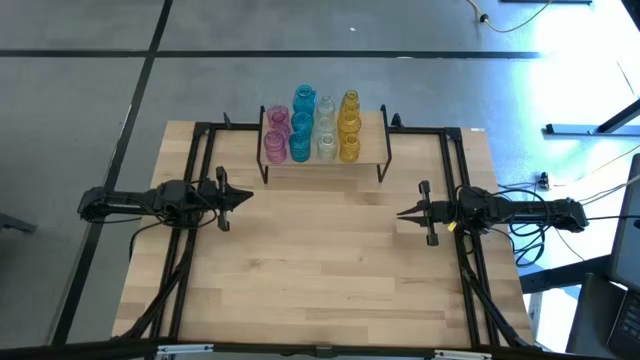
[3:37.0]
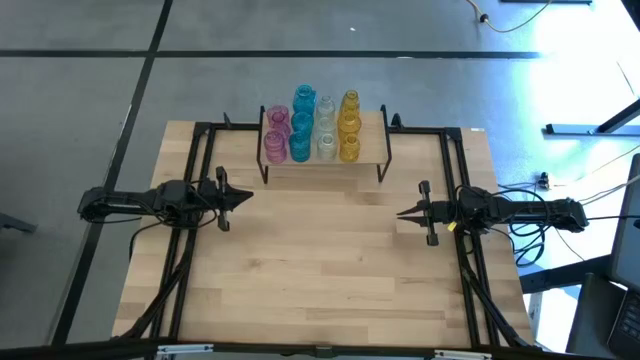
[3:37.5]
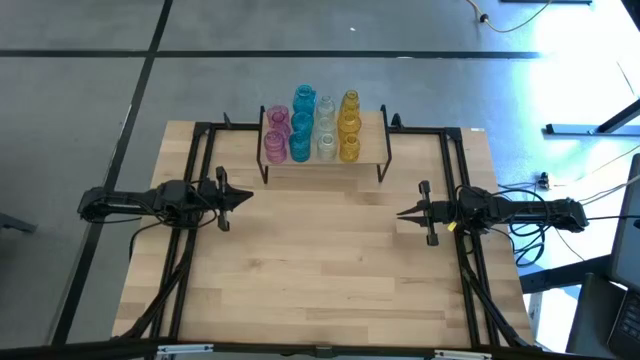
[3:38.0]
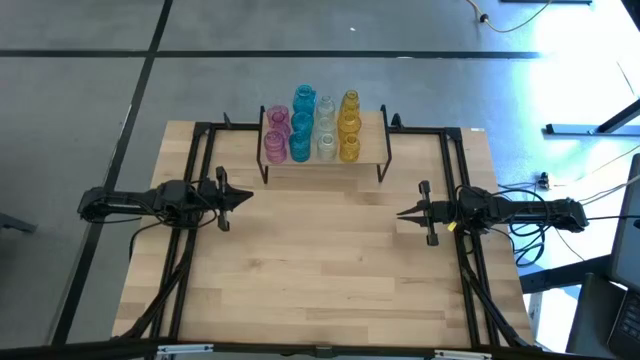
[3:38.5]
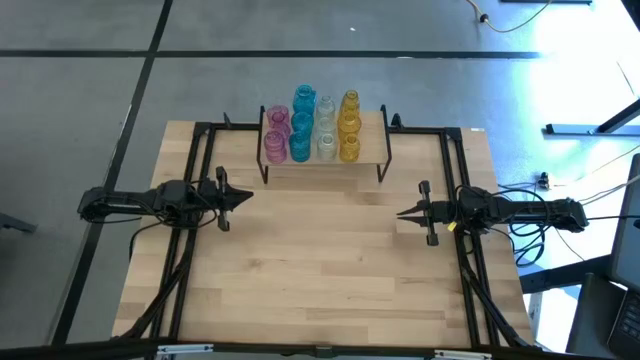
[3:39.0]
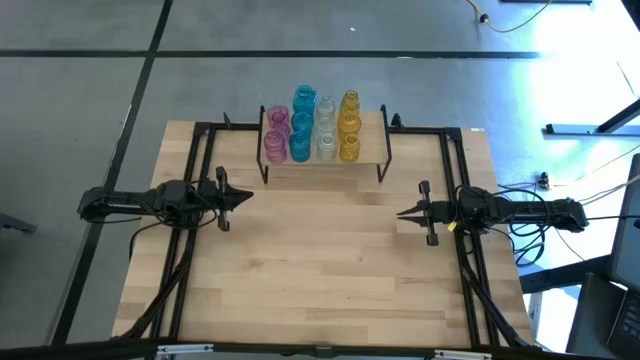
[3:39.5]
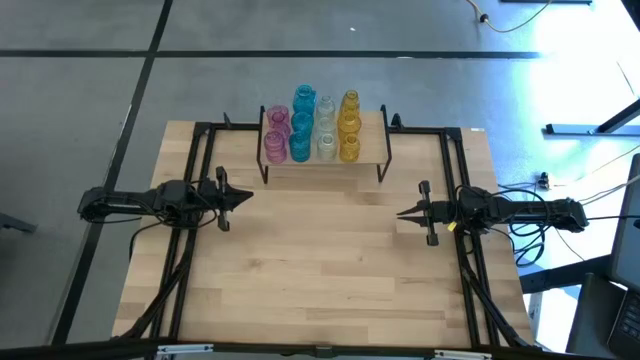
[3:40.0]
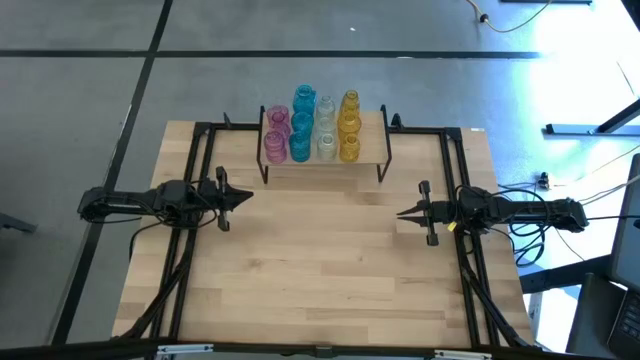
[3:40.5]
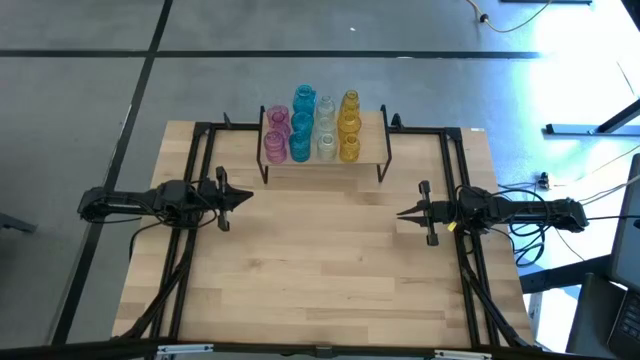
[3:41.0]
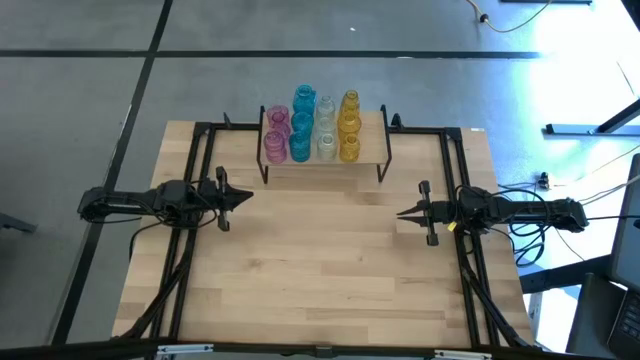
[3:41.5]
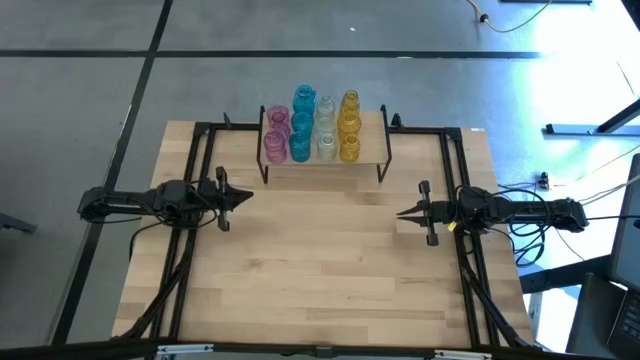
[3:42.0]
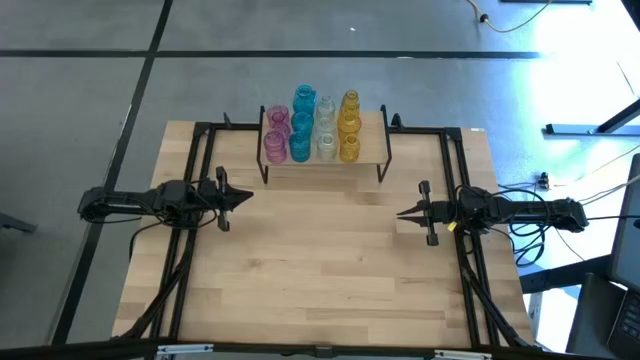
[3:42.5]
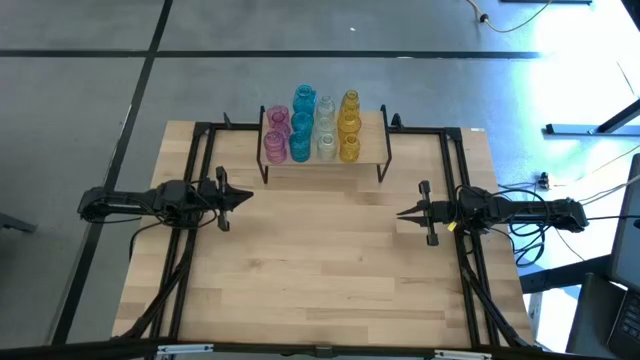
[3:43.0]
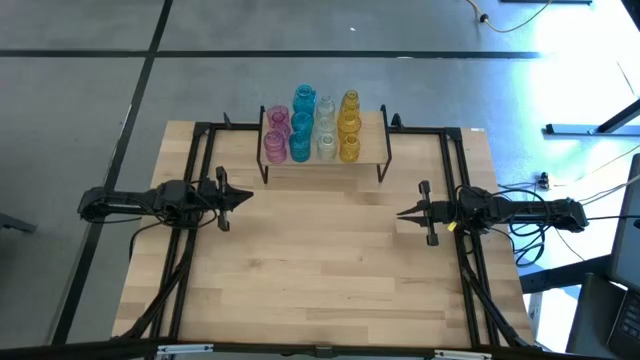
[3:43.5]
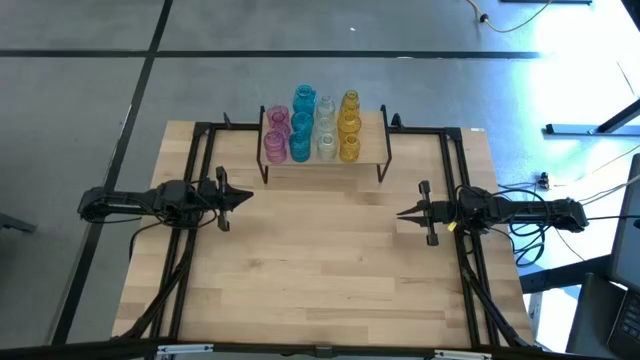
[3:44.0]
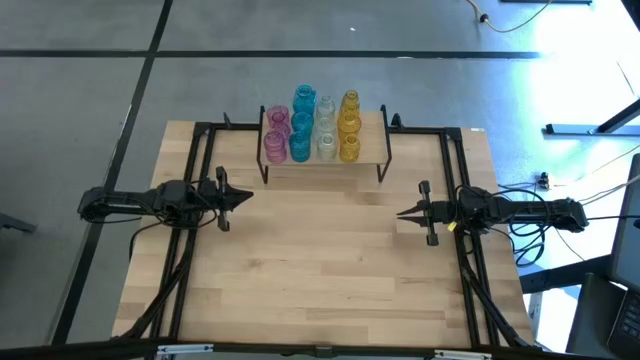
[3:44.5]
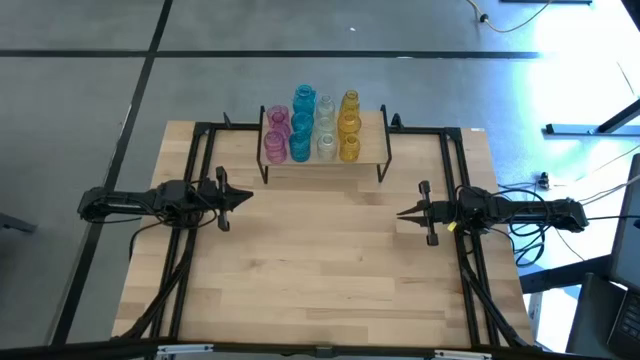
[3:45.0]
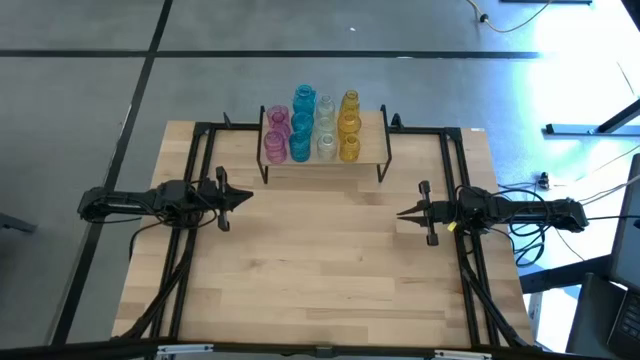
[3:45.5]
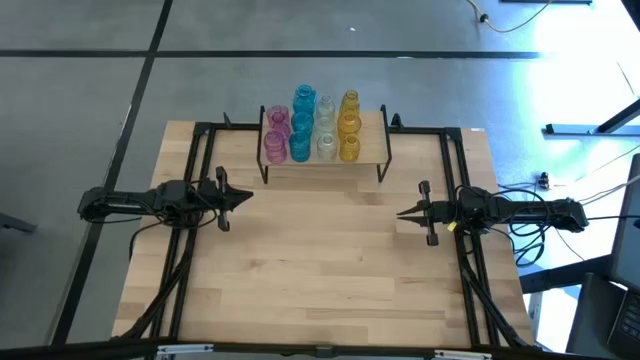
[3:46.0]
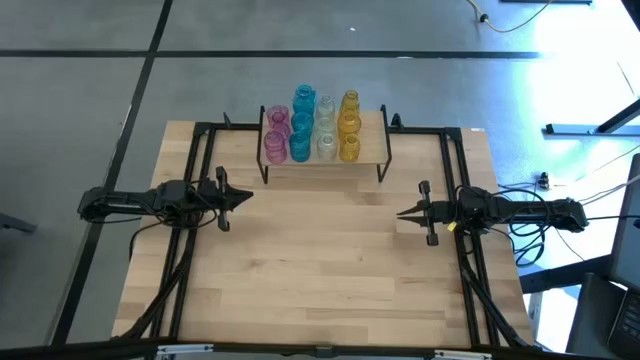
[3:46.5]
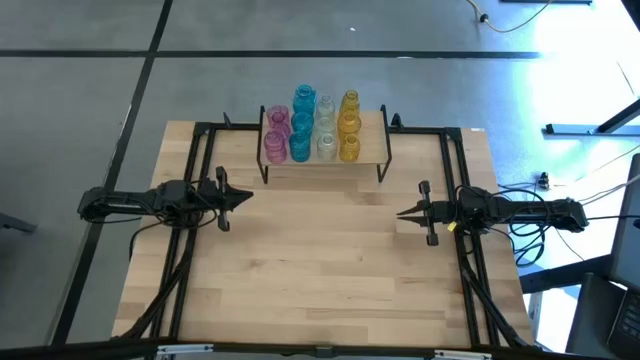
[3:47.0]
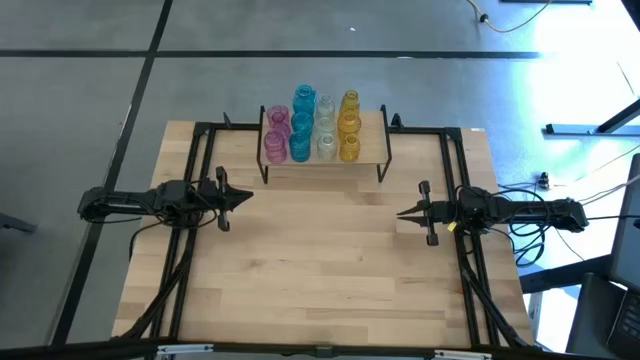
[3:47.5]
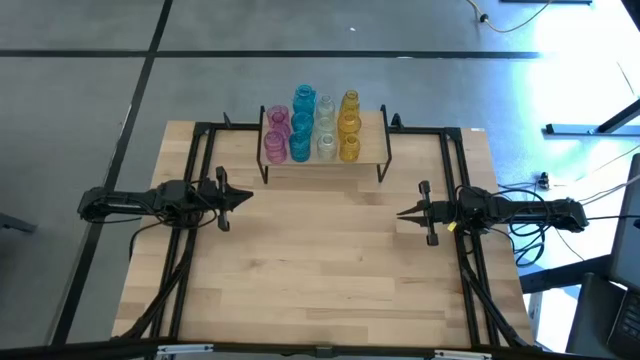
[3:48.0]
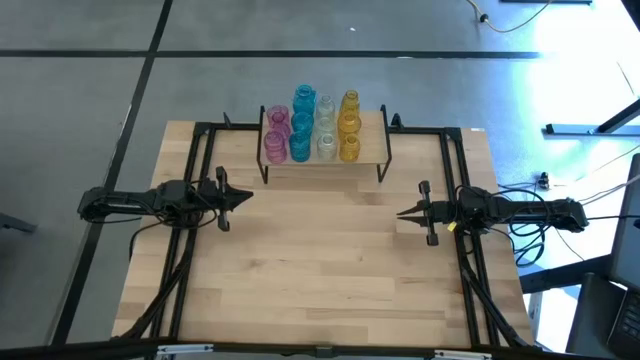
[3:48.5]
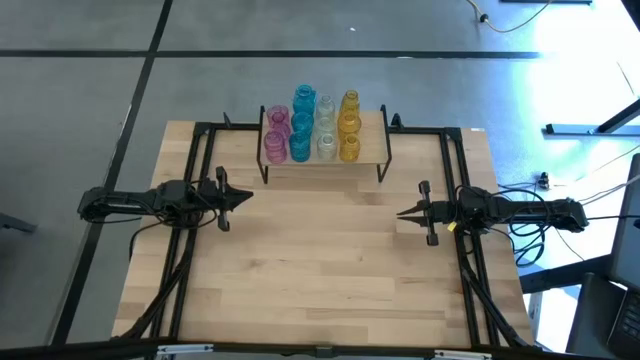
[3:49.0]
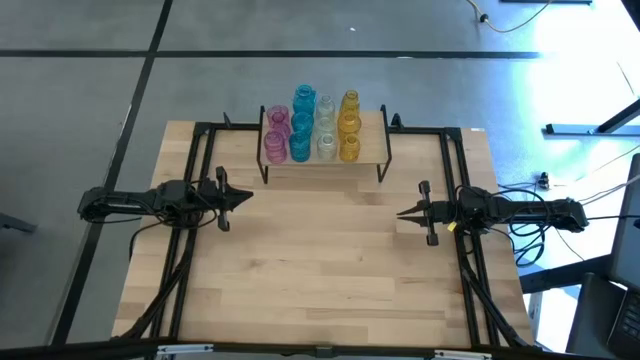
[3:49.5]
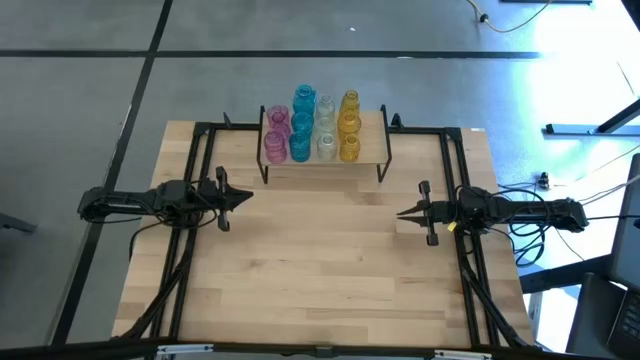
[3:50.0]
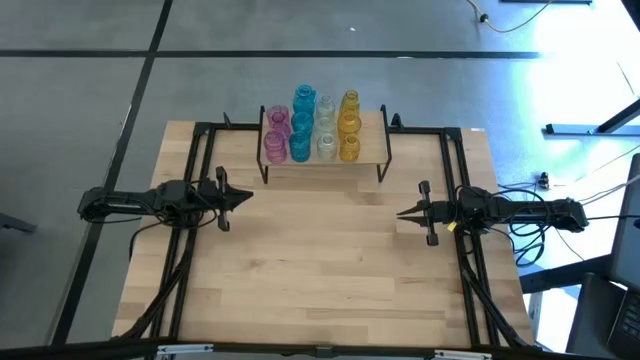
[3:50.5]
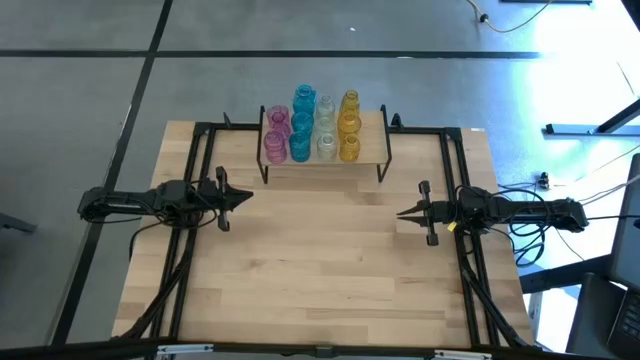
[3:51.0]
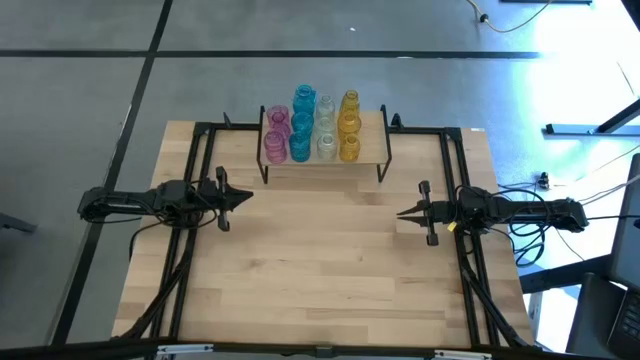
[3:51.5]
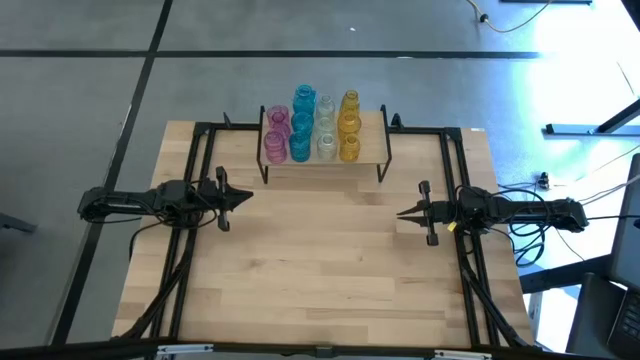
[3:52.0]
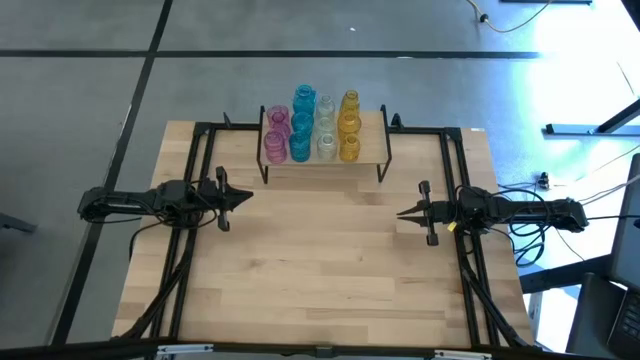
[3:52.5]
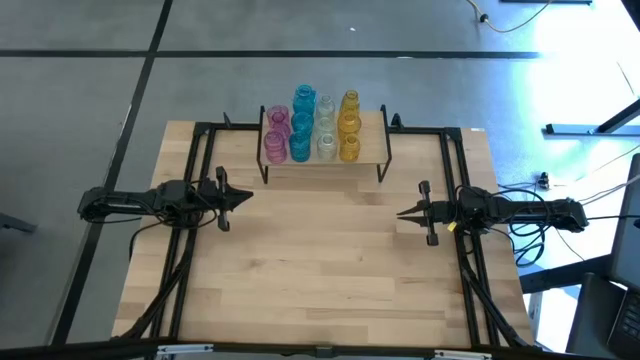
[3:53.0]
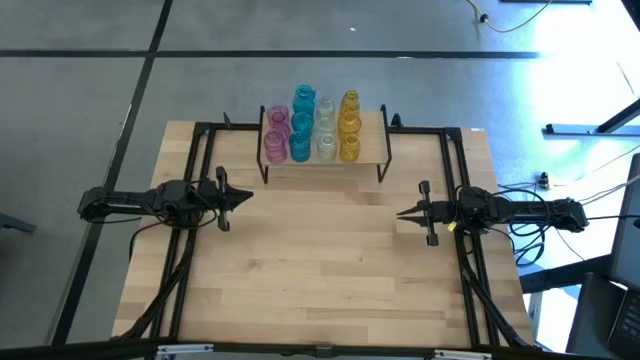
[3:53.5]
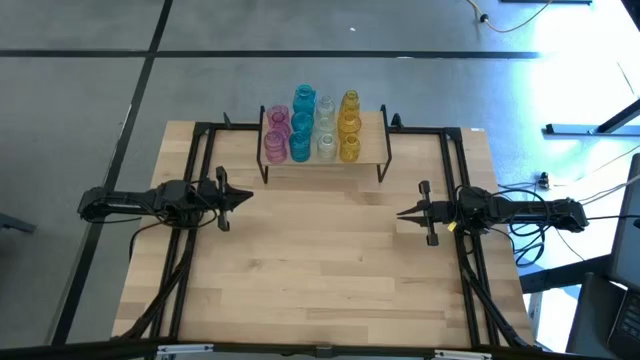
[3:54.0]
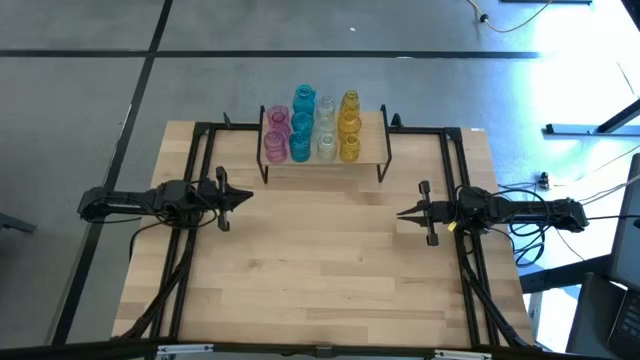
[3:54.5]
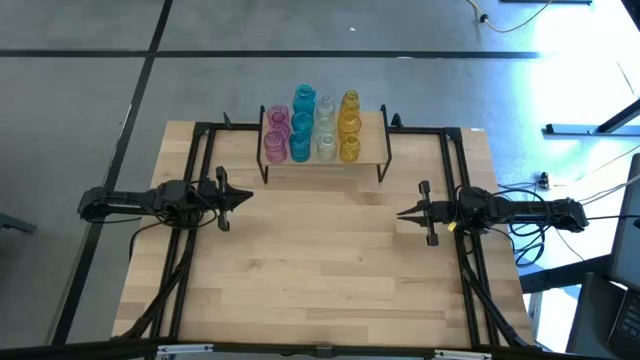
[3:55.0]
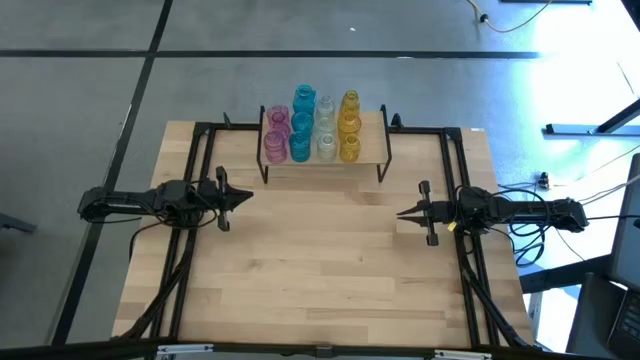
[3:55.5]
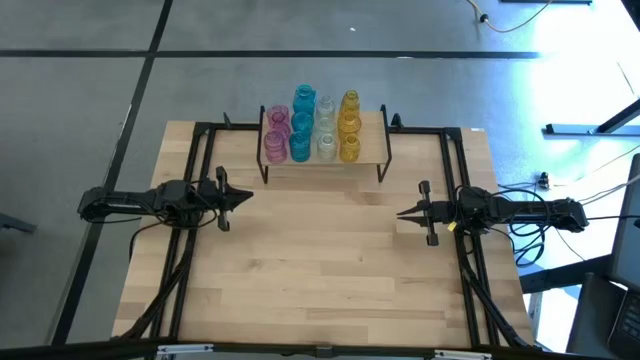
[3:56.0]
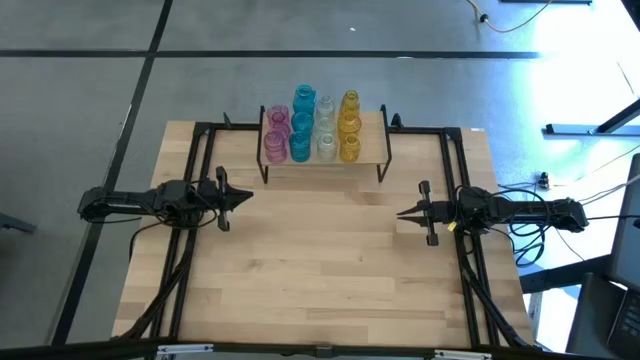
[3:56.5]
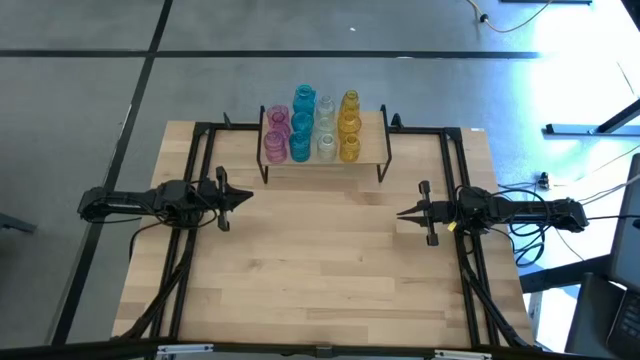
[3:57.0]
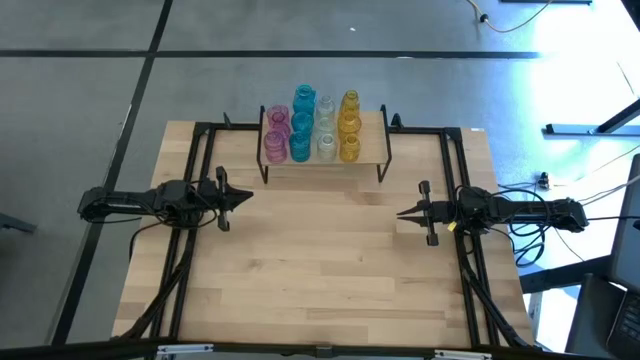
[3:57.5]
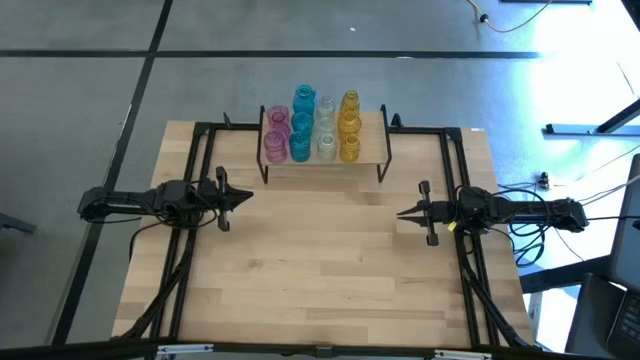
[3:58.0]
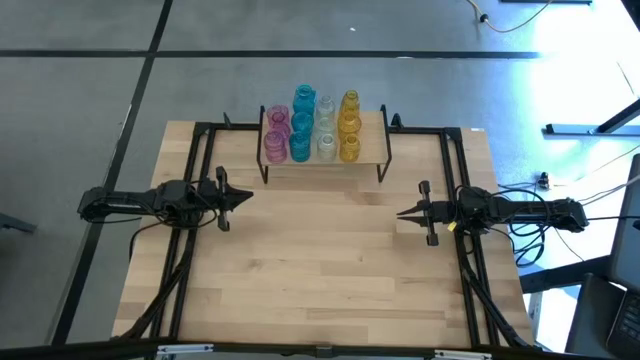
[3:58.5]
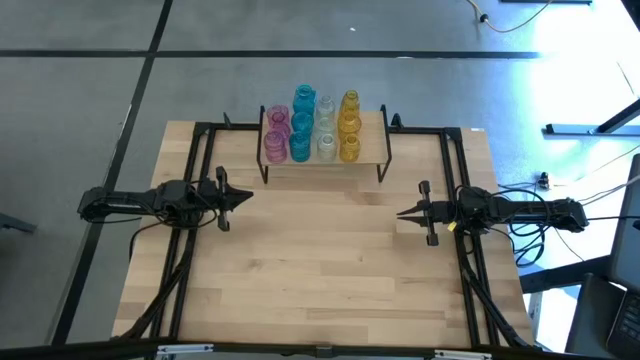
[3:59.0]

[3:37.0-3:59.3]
Task: sort vases onto shelf
Return to Home Position
